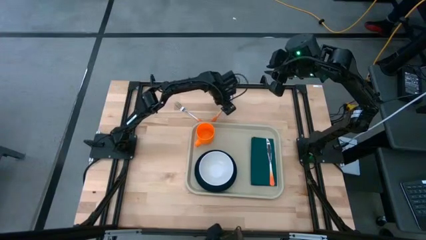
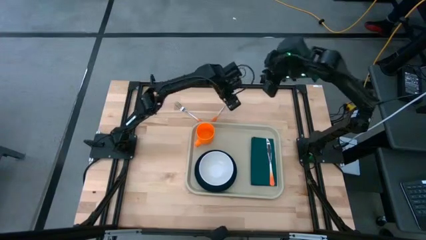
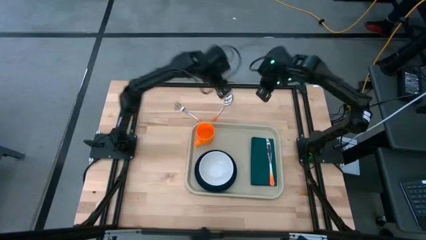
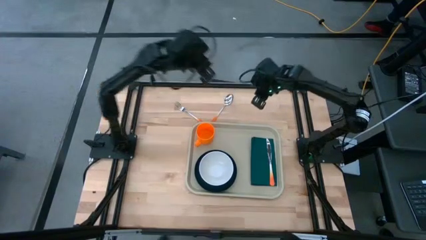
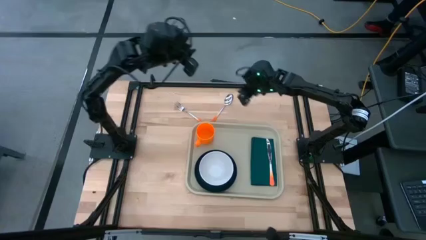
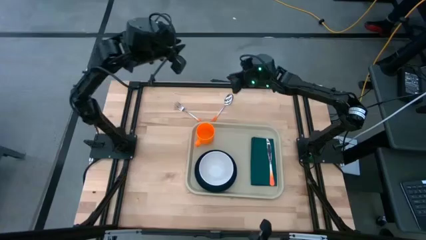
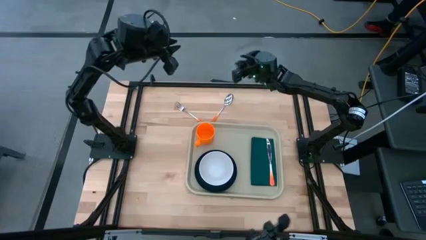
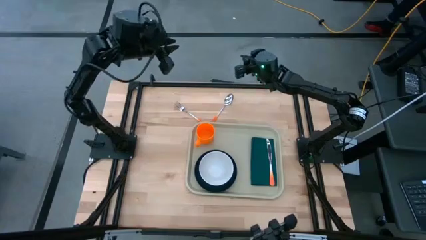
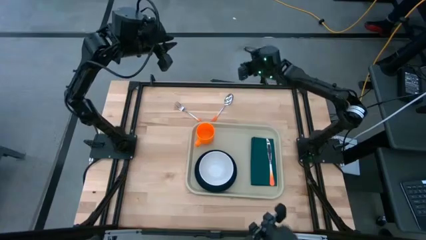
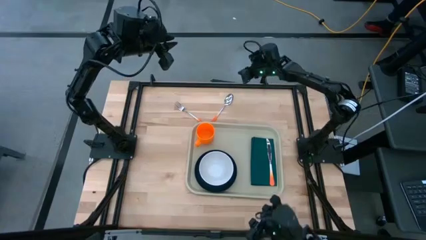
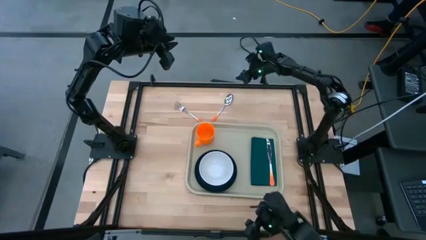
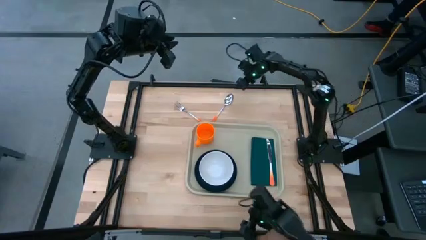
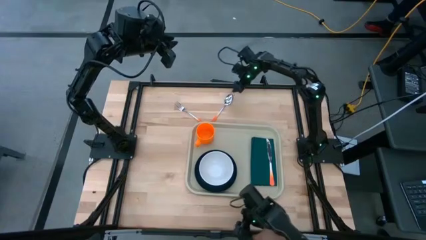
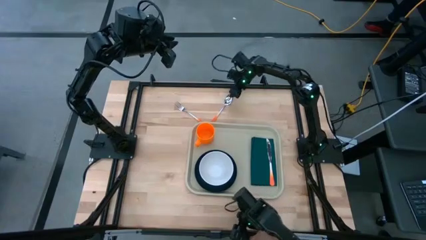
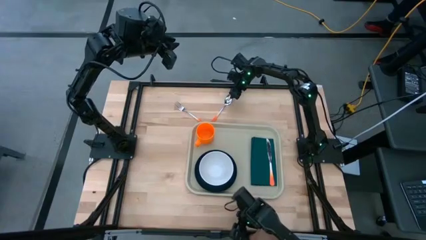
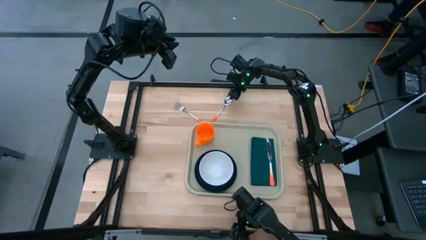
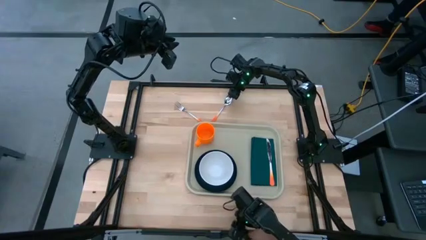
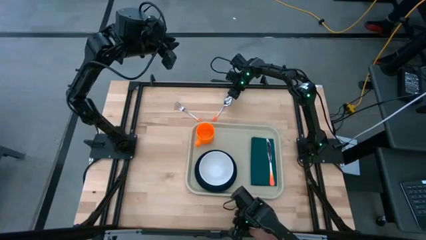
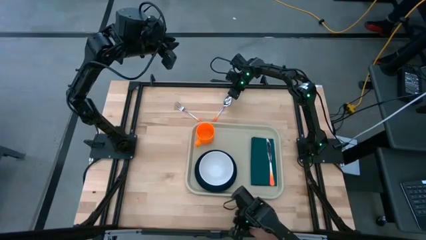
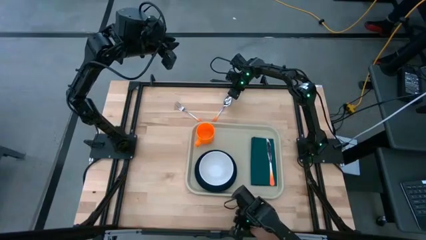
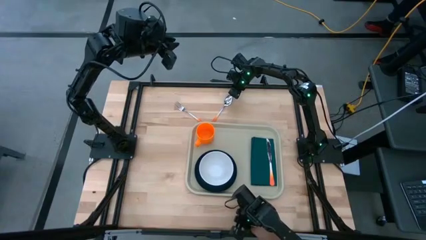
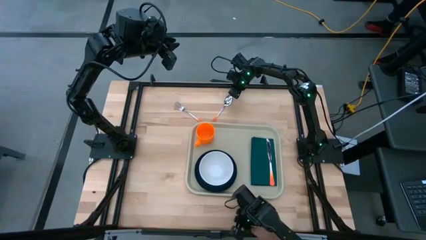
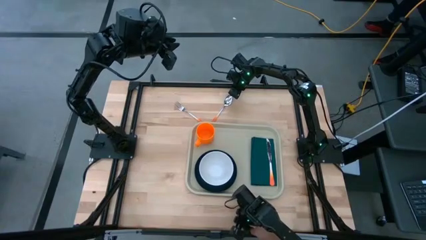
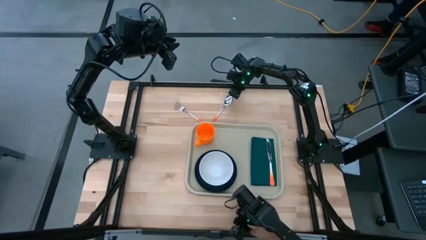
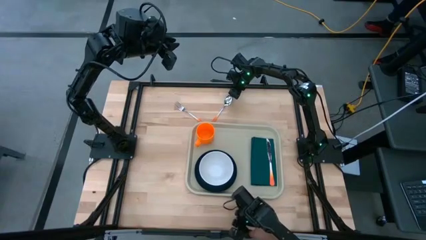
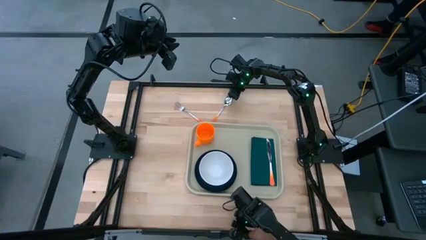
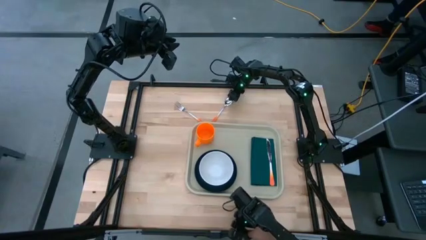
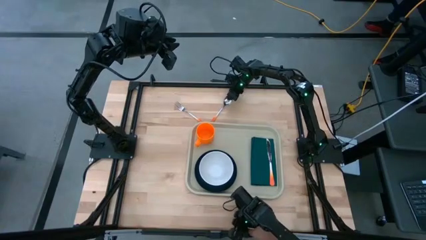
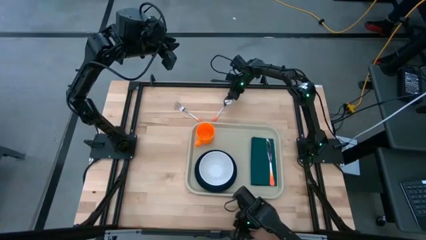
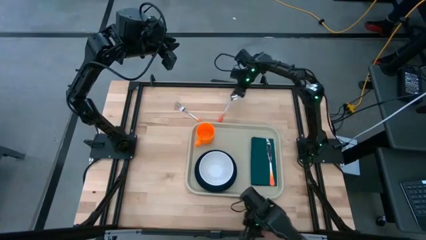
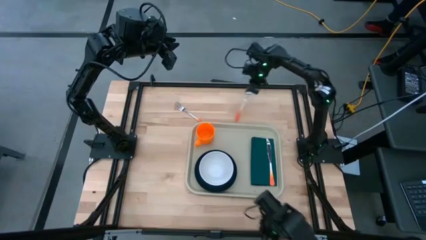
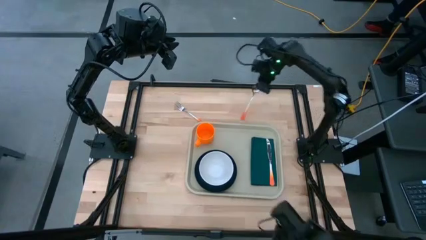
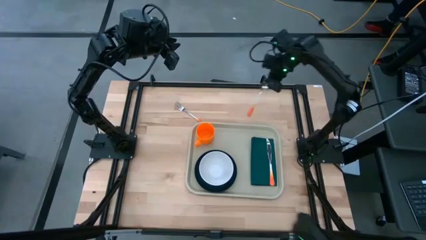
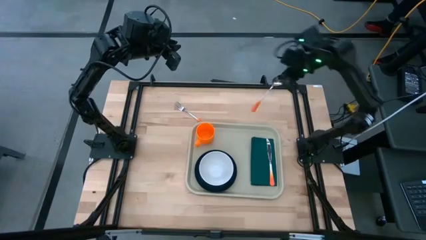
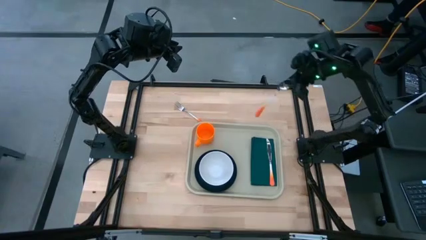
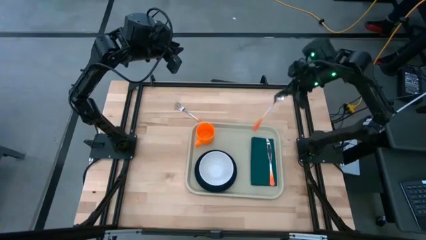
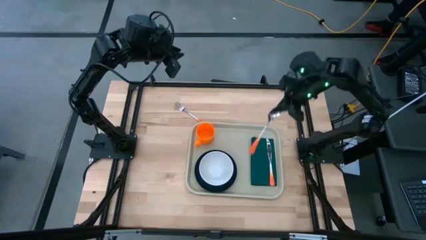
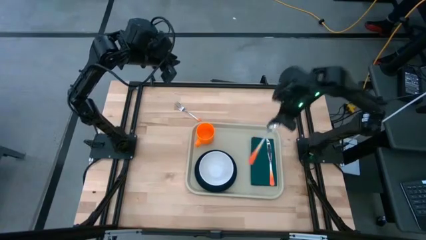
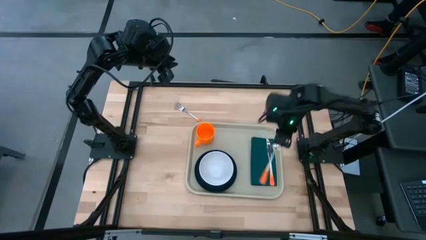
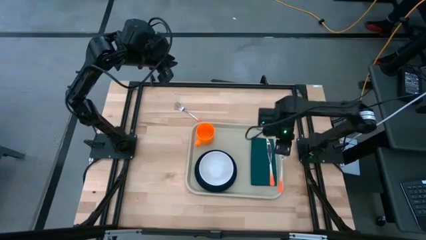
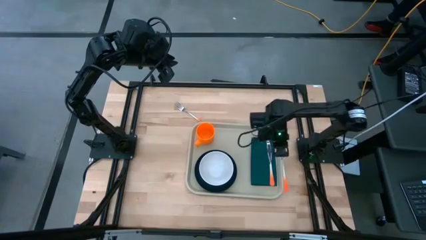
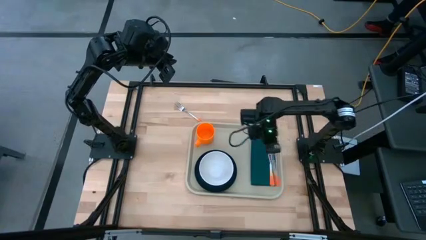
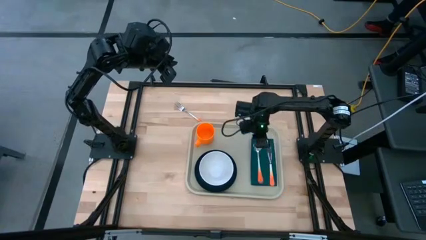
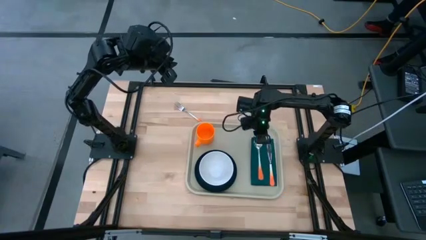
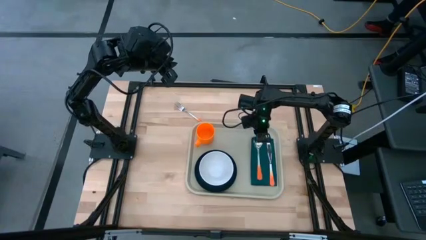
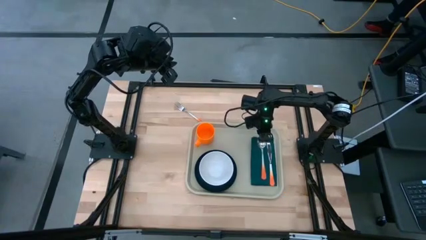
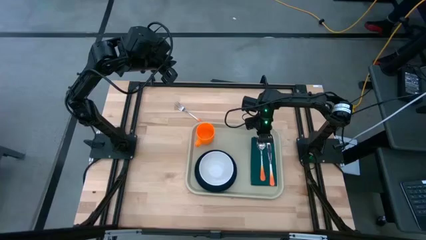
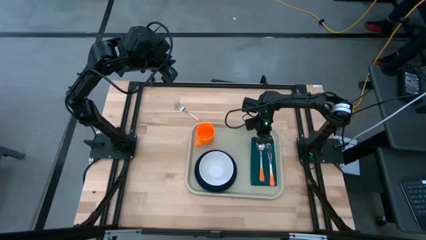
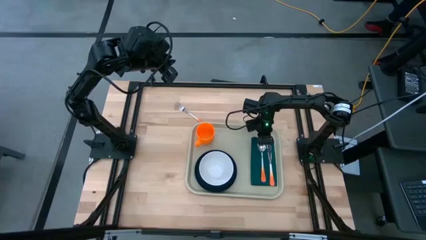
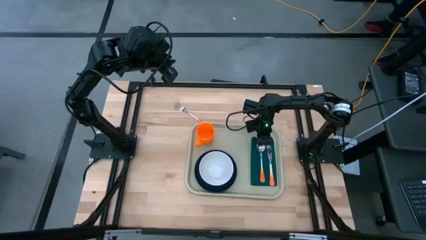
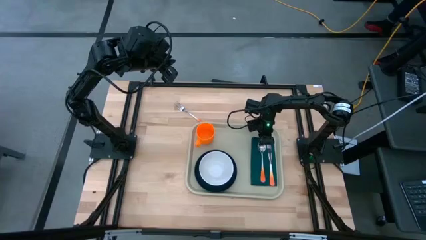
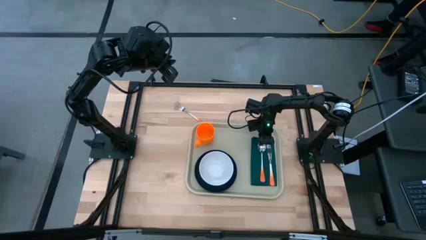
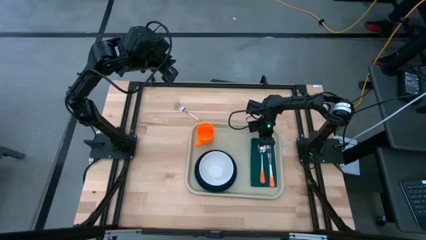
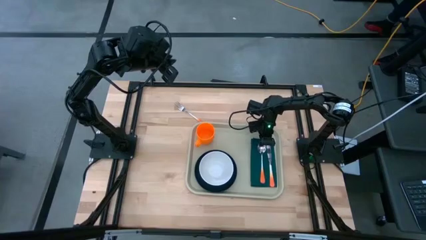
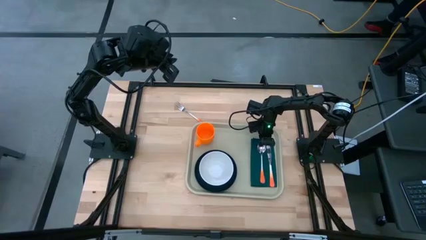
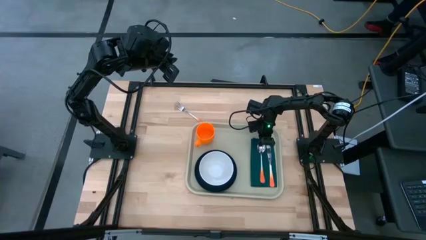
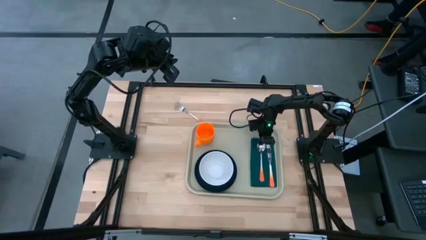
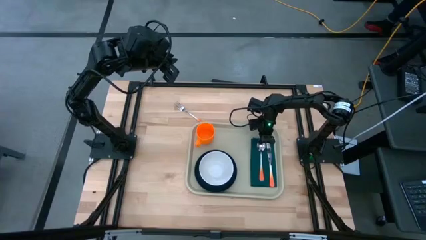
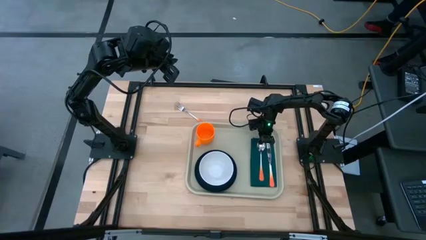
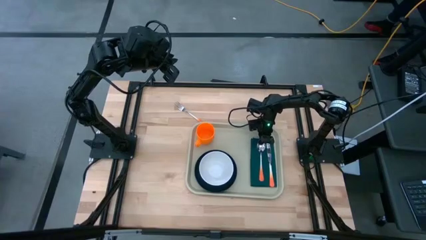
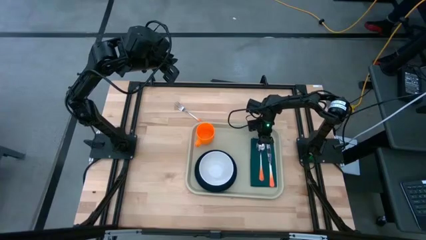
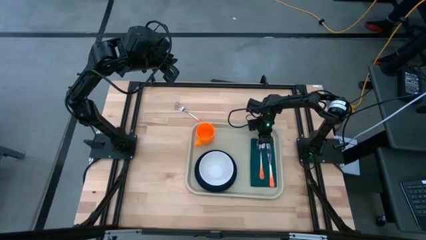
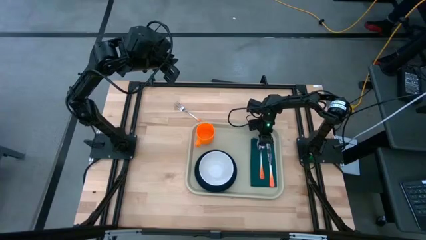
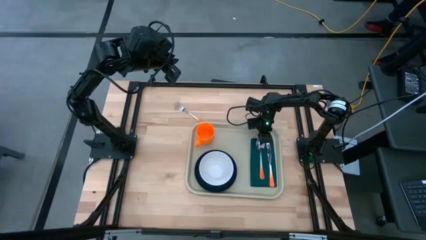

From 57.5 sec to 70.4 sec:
Task: Set up tray
Put the orange spoon on the green napkin to the left of the orange knife

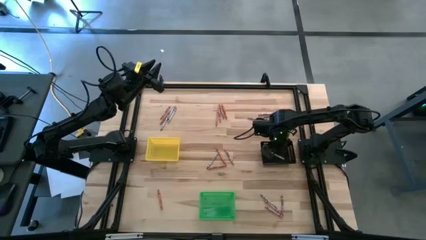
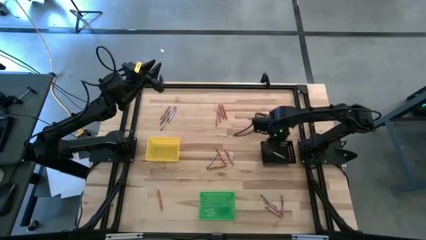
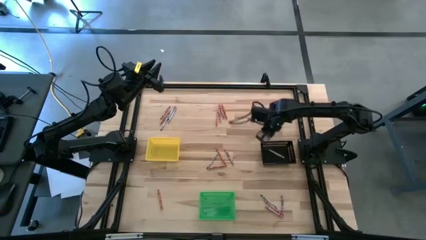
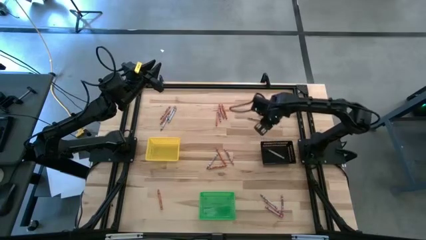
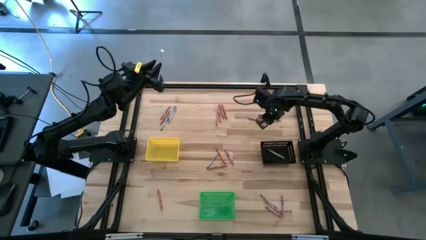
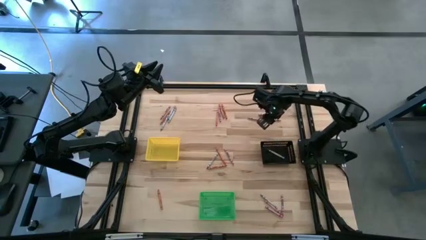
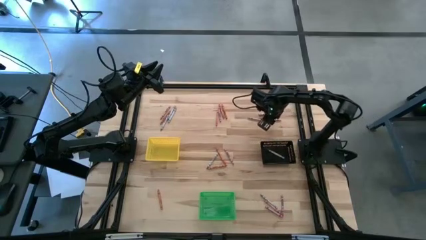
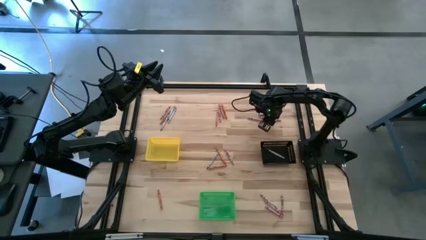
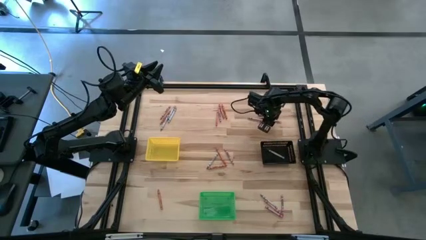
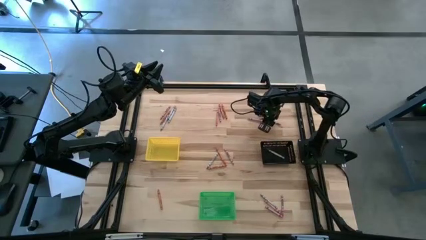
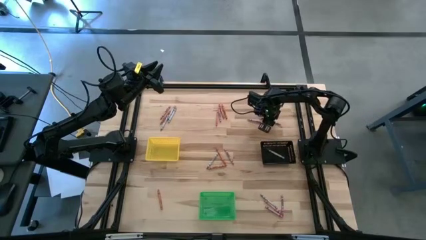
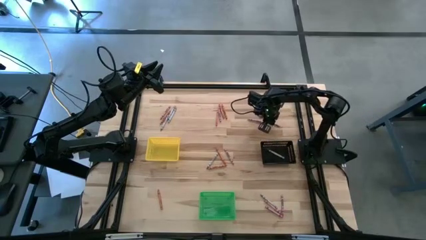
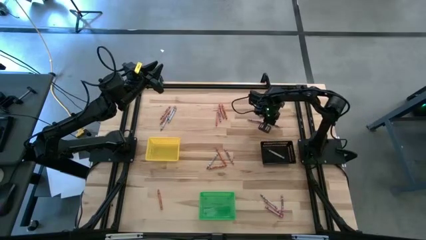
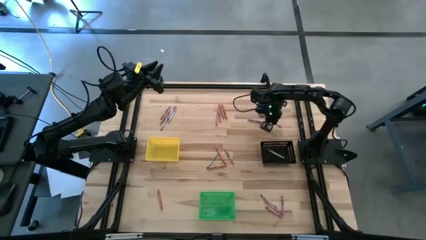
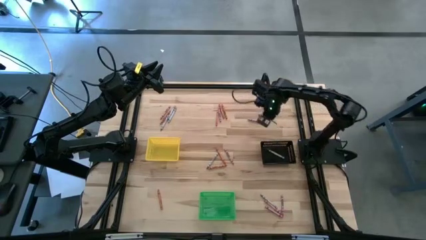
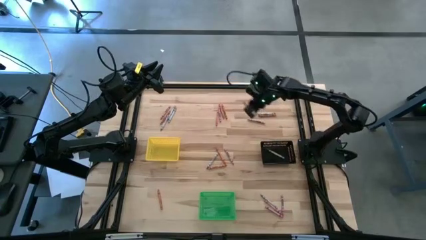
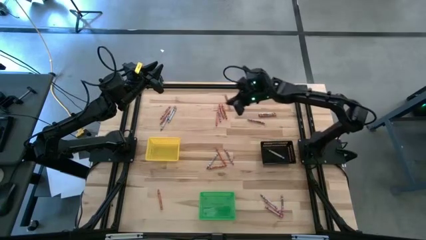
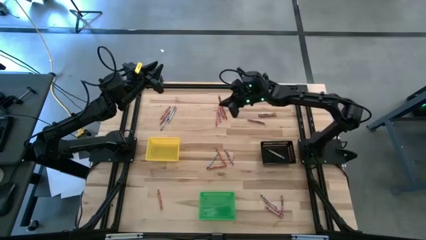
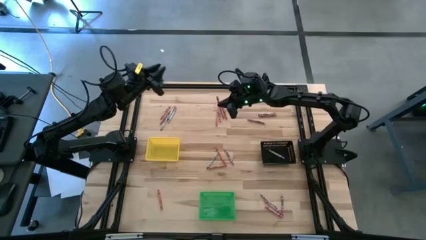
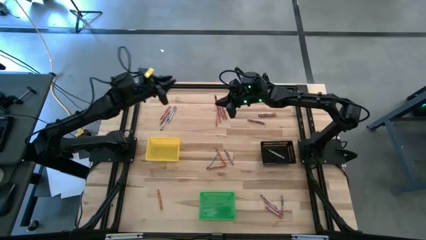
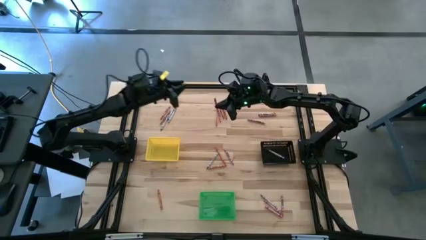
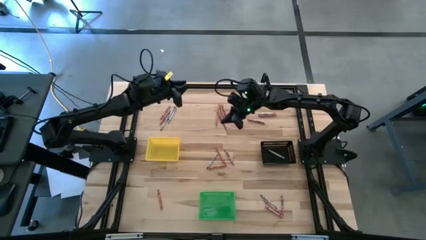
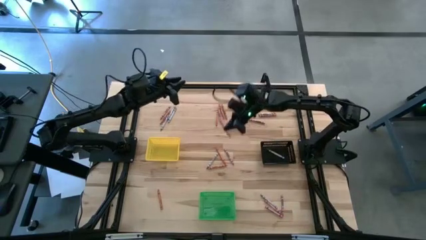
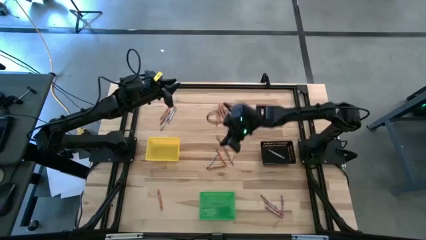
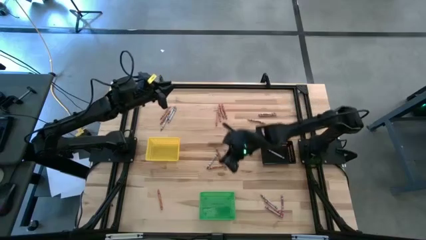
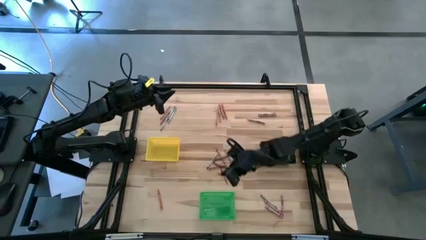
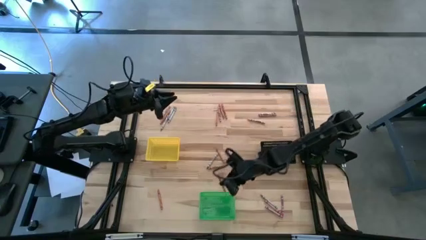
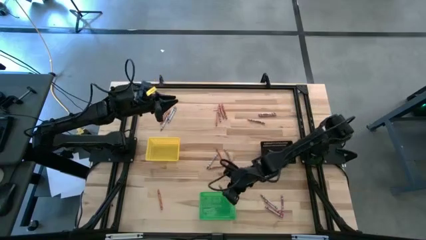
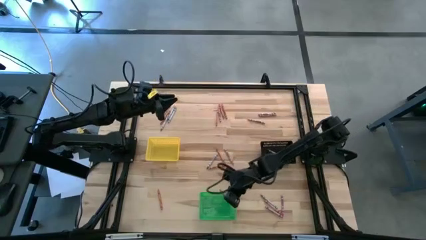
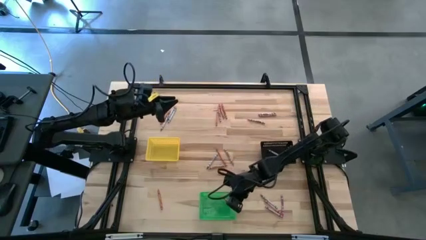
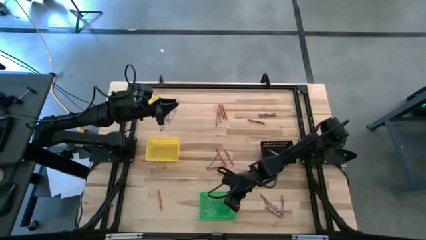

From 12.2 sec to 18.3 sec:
Task: Sort crayons
Put the pink crayon into the green bin
